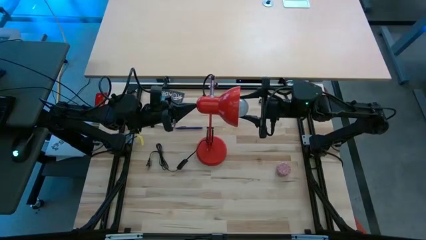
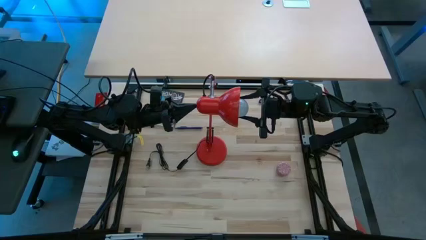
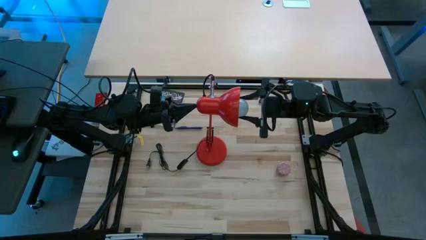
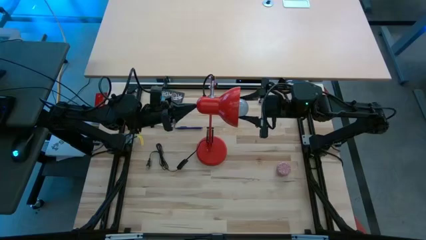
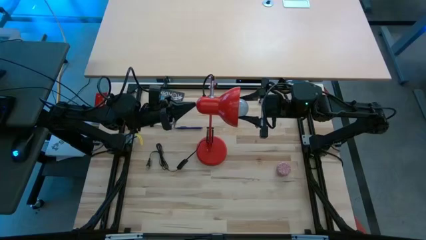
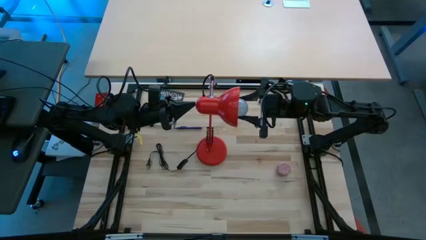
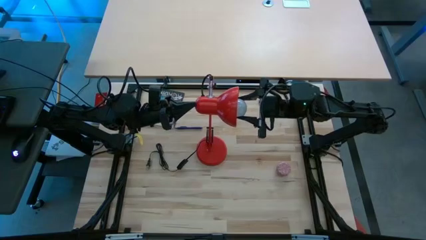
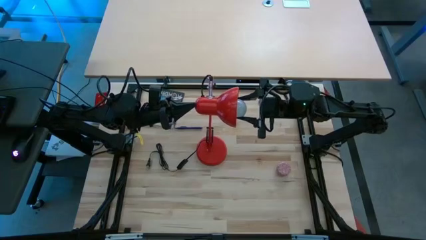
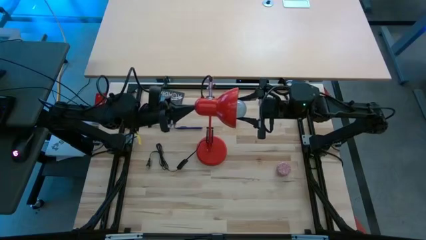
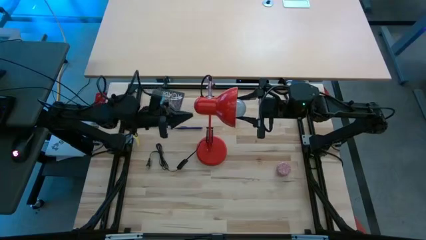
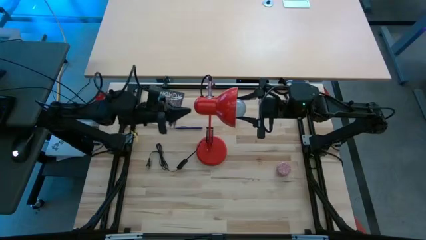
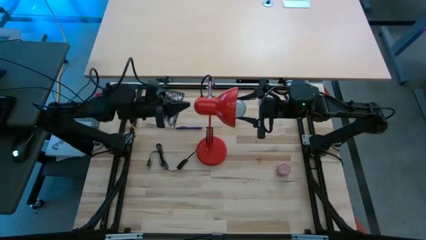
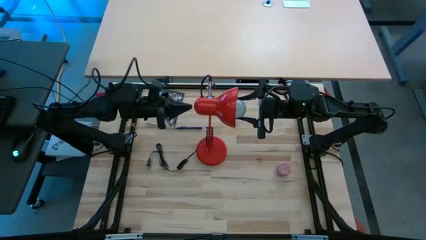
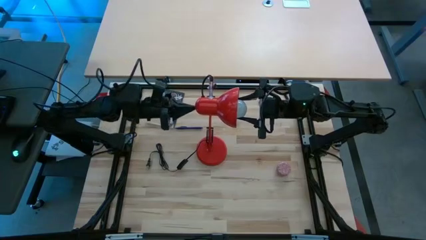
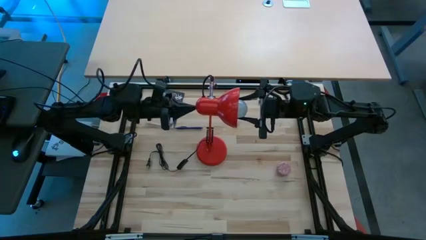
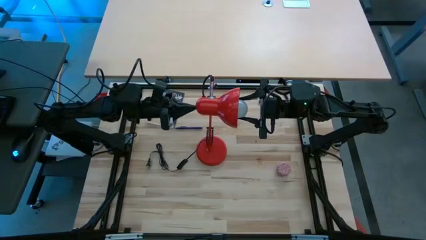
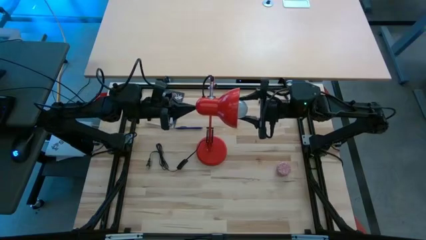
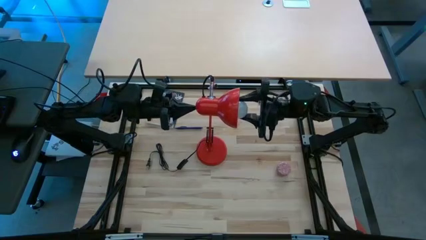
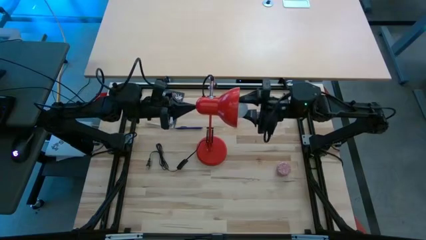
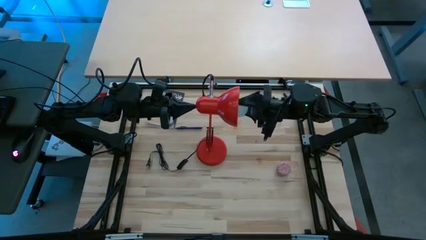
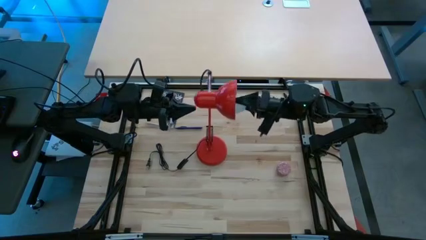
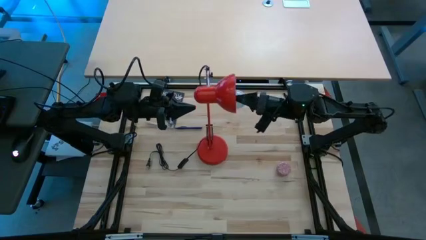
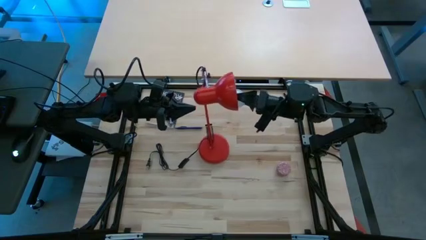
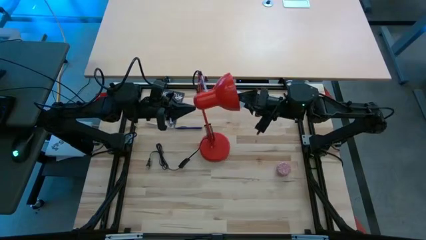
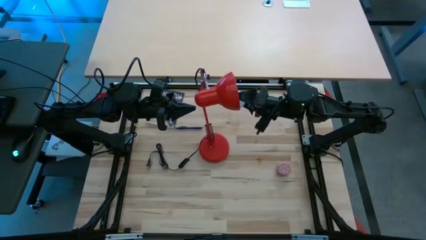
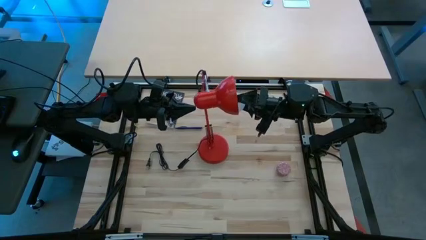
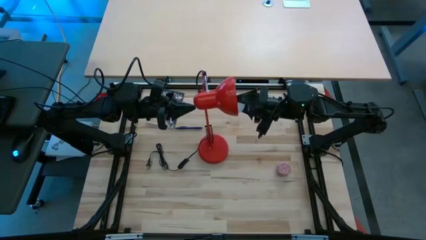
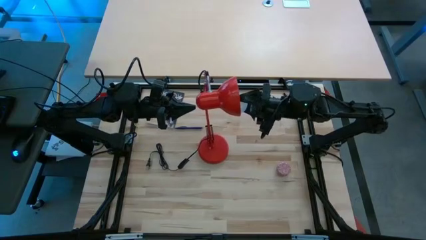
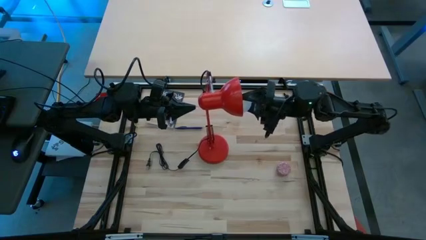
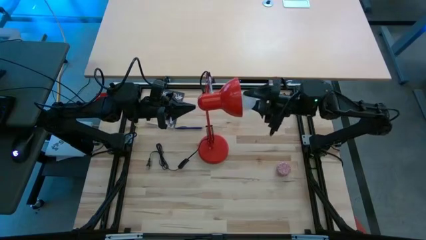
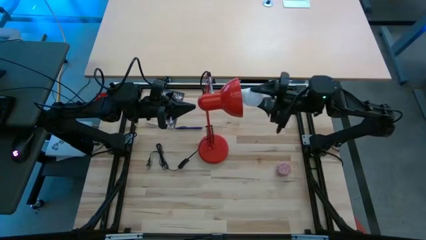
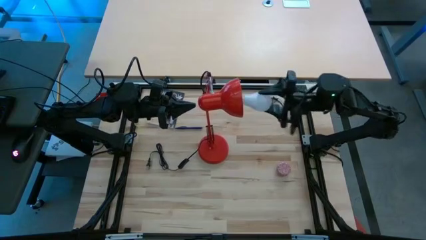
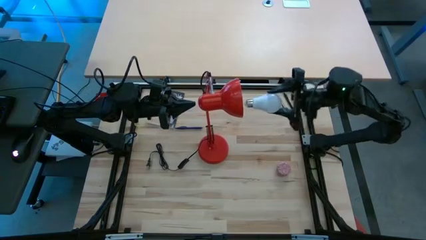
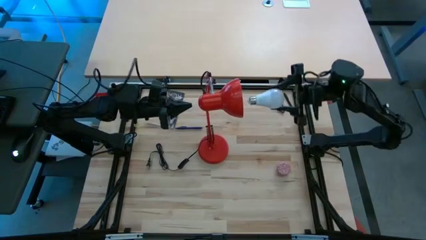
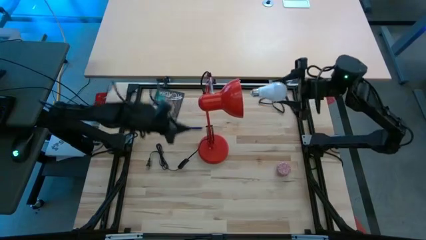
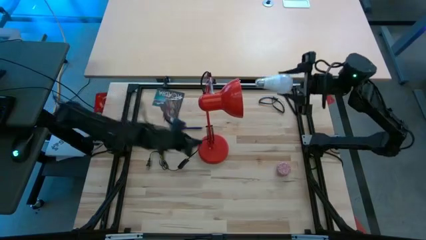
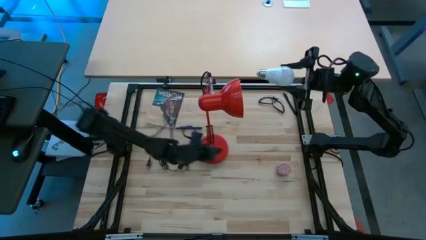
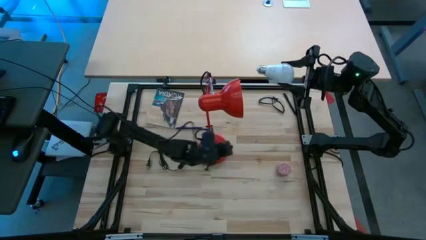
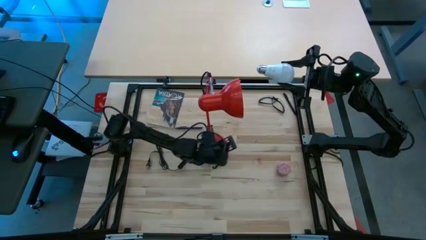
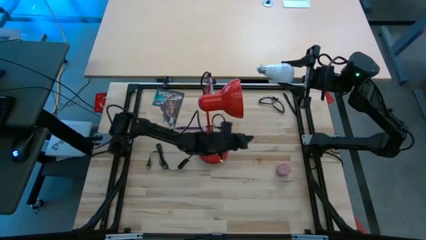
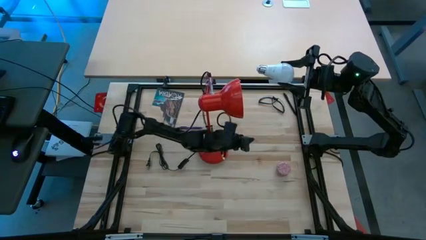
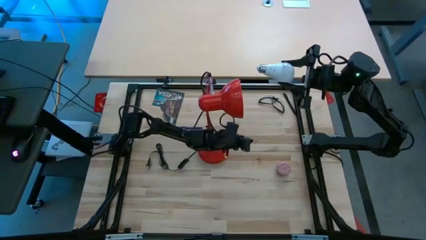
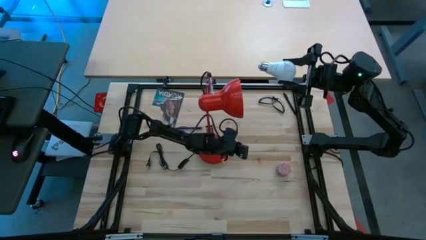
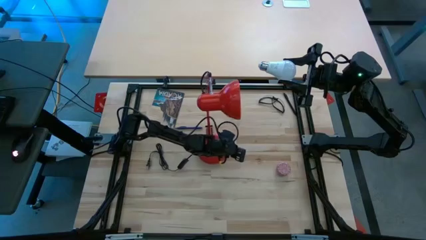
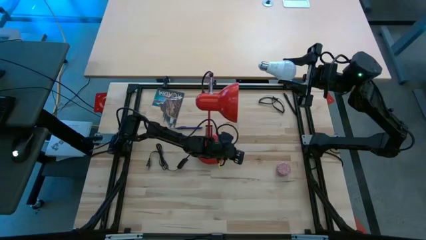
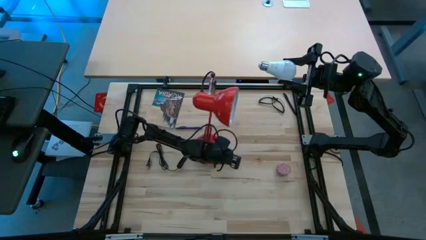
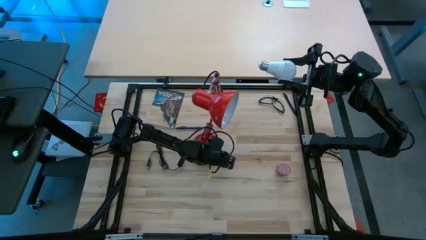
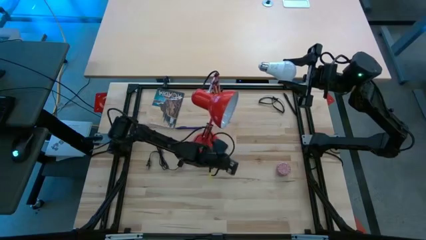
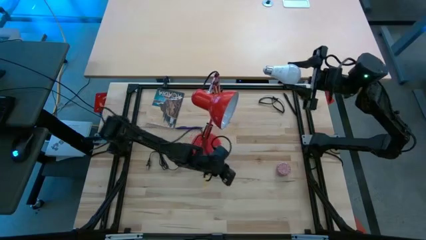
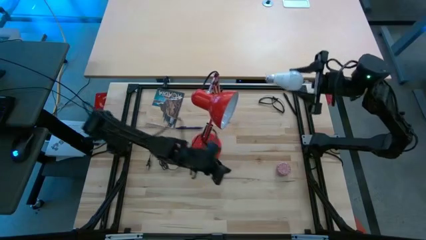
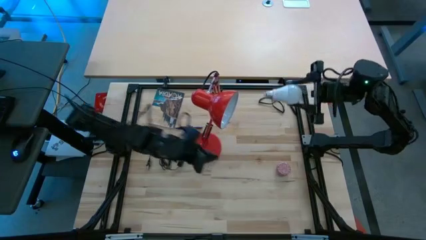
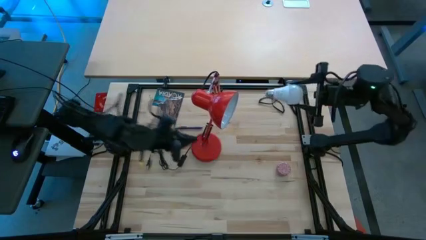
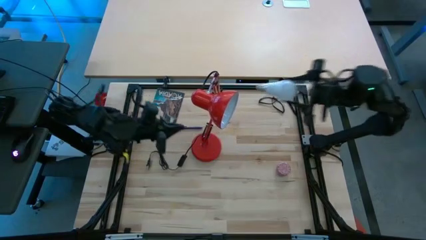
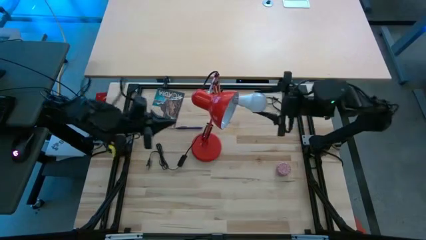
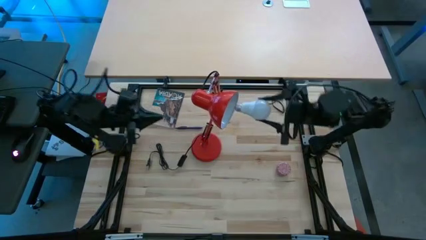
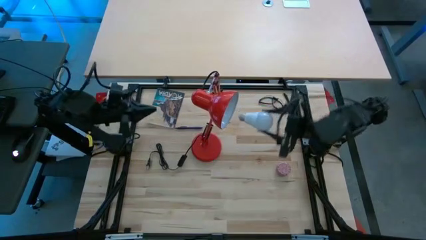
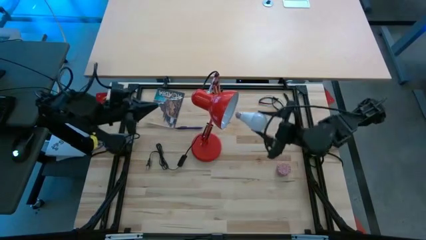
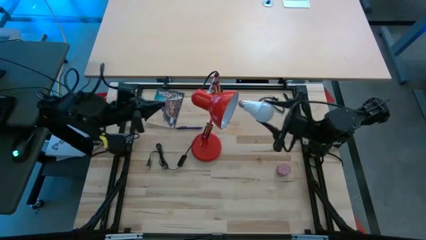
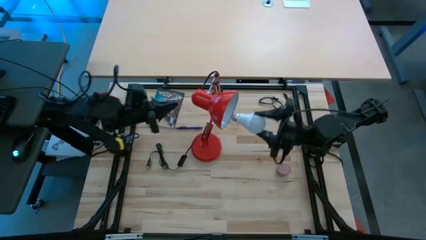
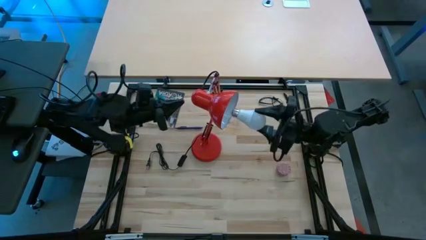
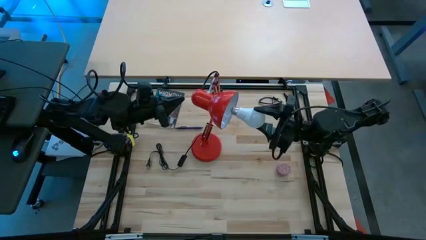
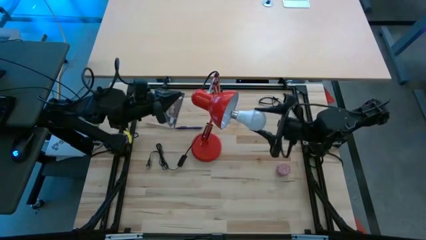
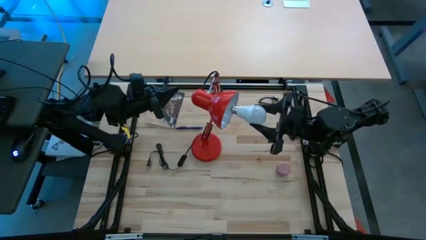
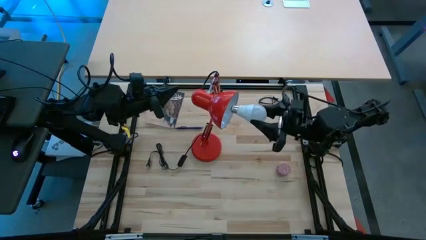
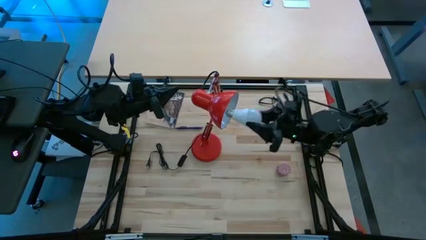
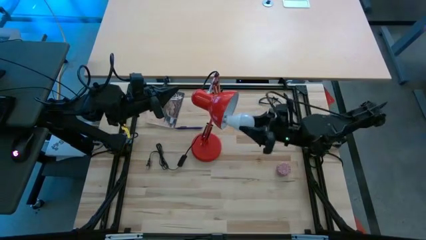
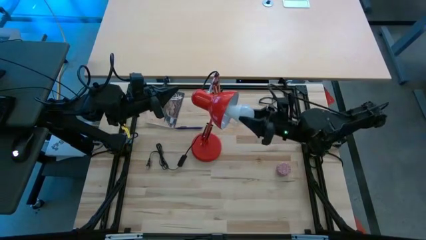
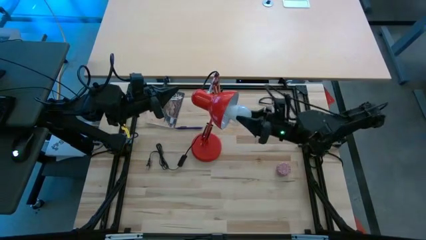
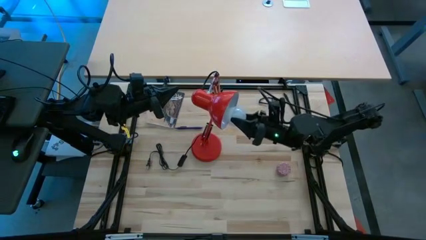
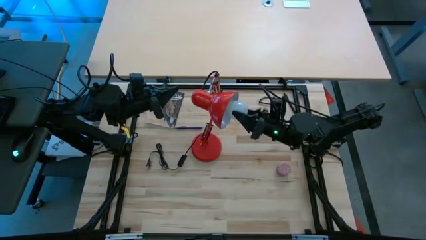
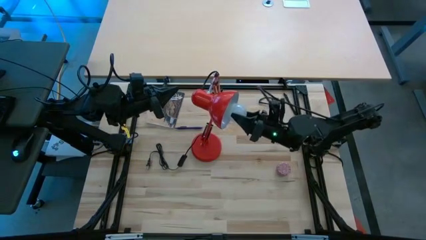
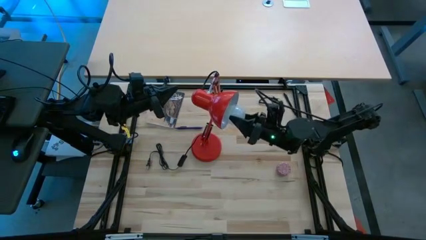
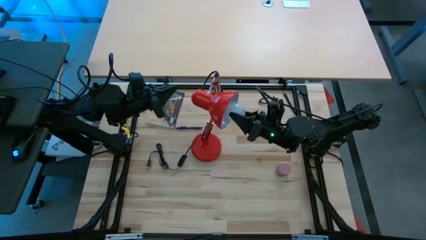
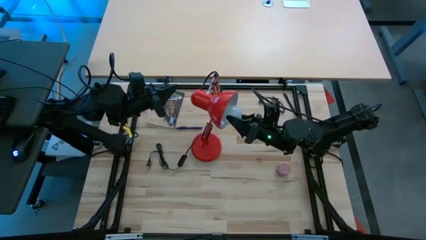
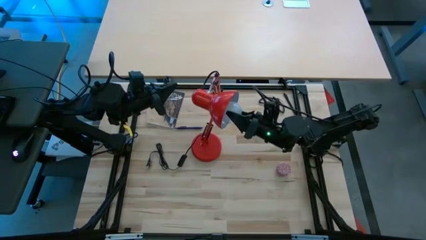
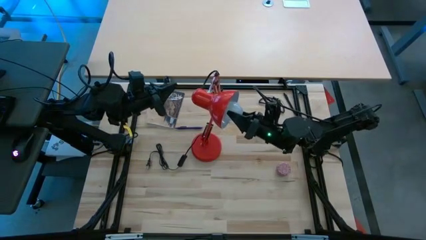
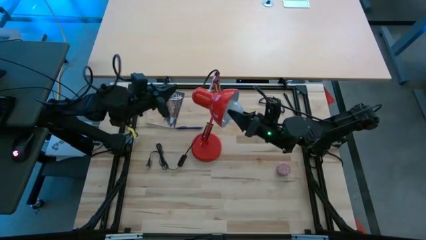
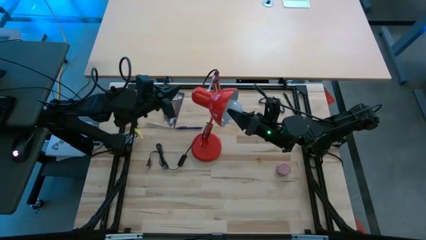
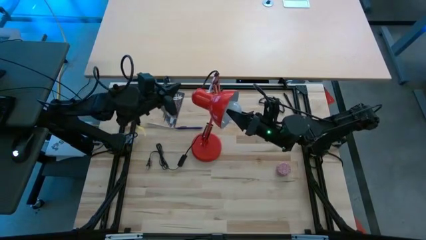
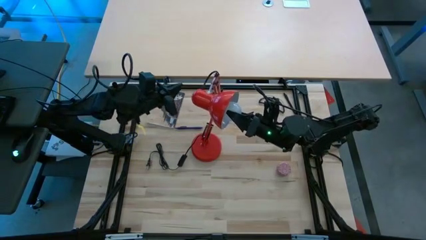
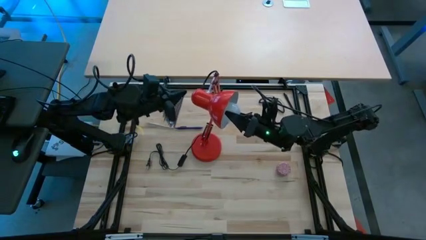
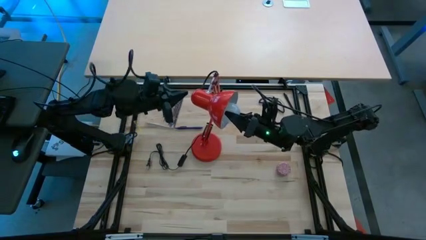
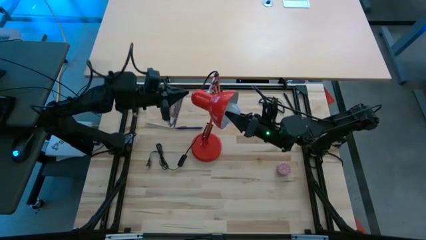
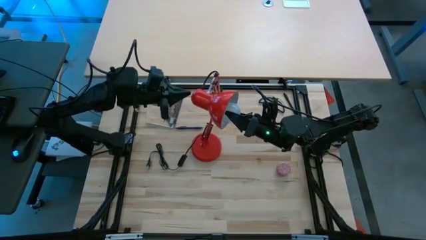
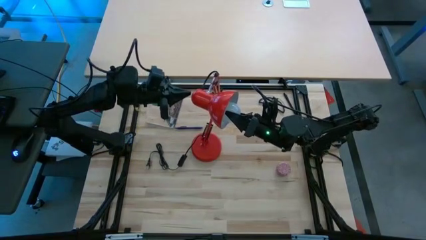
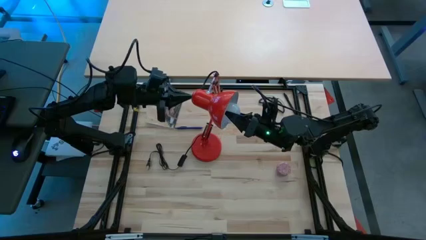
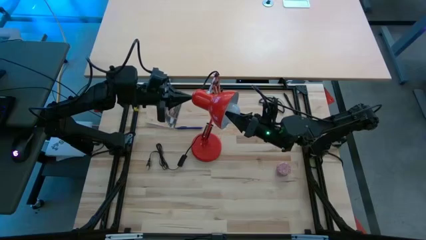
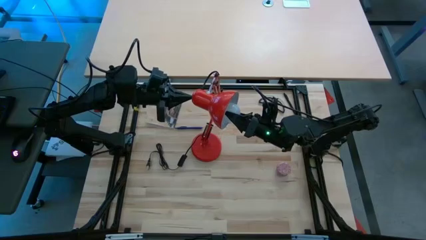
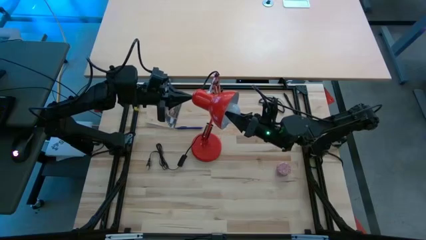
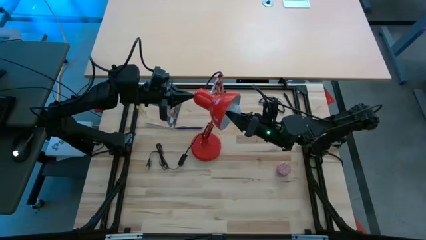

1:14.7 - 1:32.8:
Task: Screw lightbulb
Insert the lightbulb on the lamp
